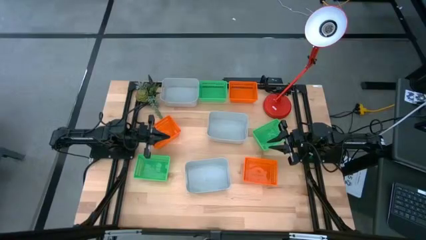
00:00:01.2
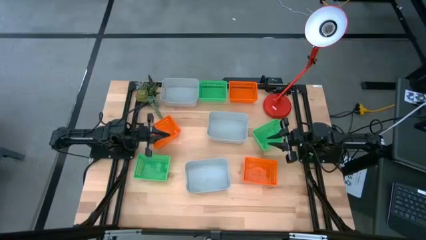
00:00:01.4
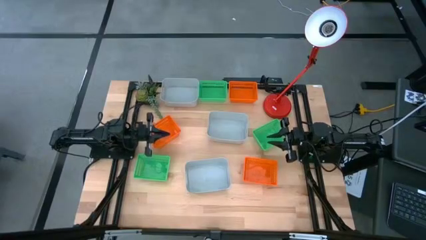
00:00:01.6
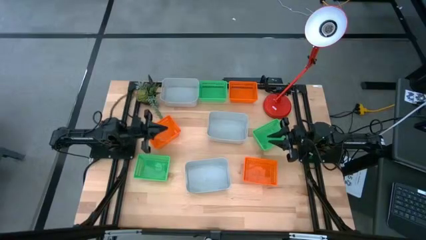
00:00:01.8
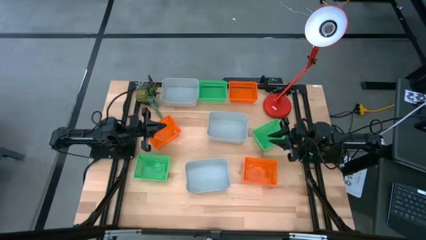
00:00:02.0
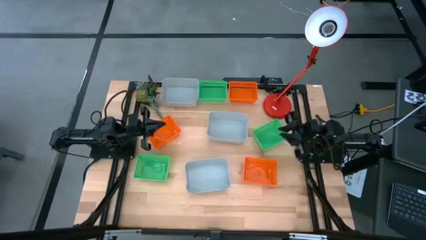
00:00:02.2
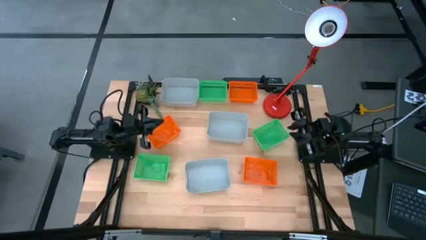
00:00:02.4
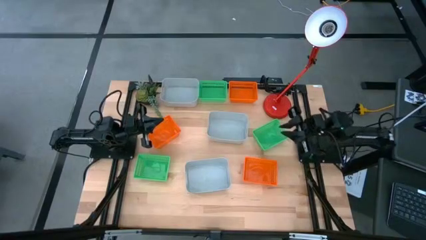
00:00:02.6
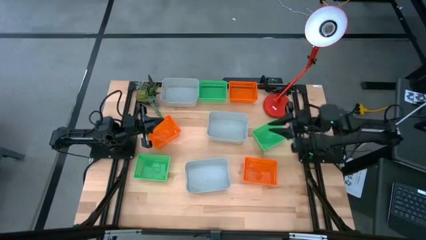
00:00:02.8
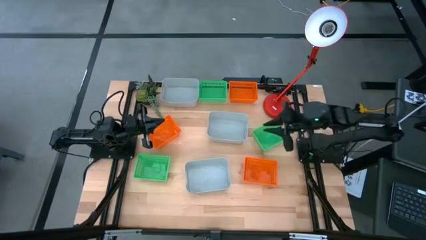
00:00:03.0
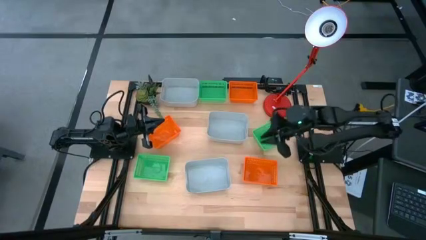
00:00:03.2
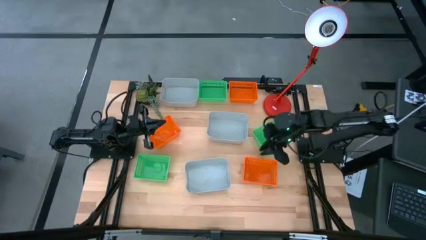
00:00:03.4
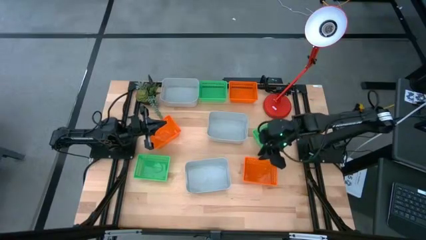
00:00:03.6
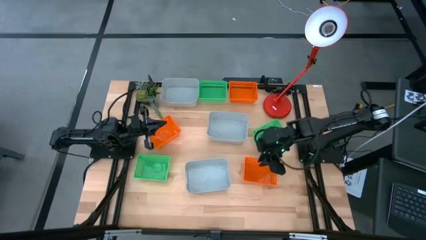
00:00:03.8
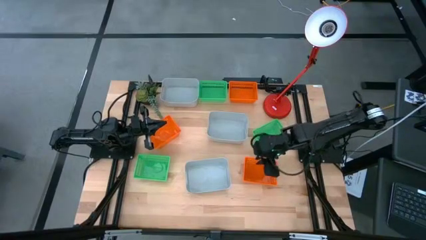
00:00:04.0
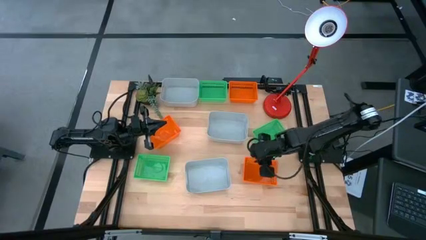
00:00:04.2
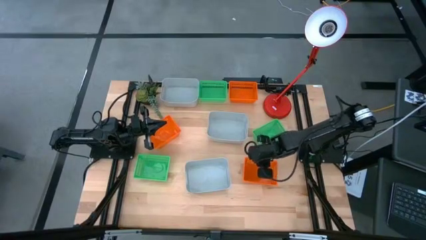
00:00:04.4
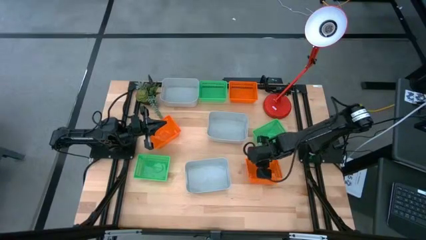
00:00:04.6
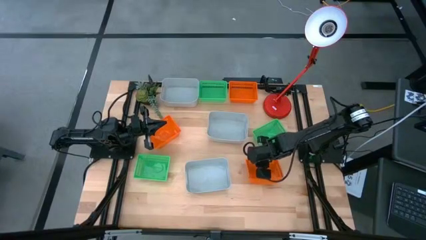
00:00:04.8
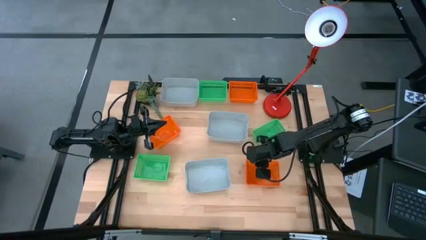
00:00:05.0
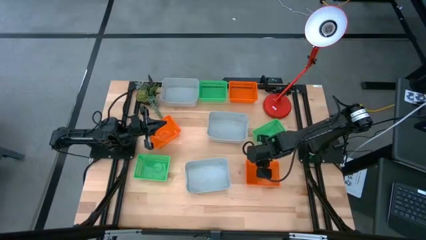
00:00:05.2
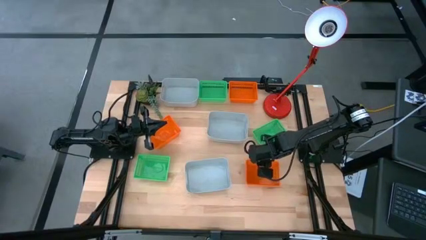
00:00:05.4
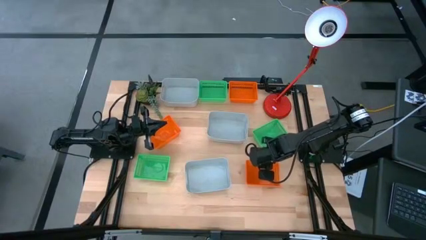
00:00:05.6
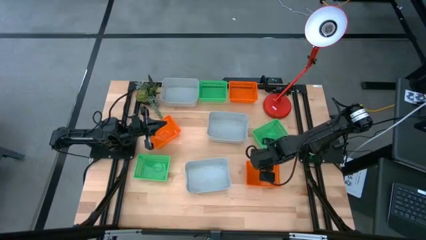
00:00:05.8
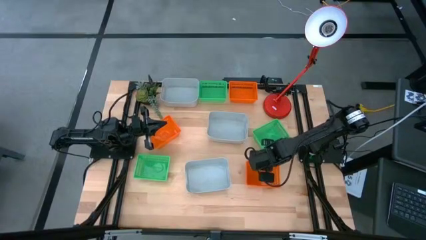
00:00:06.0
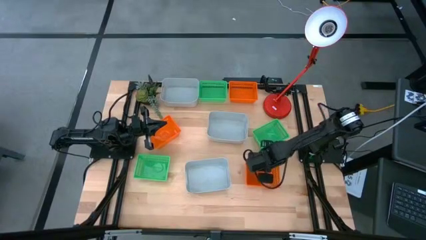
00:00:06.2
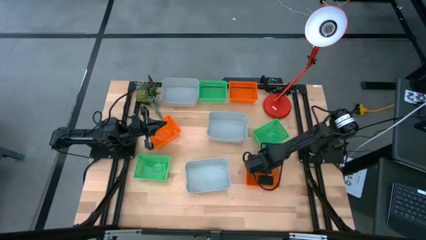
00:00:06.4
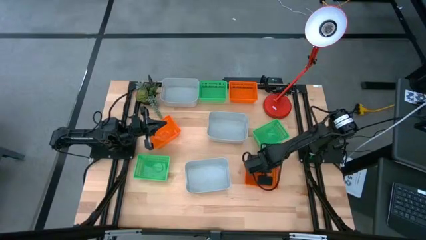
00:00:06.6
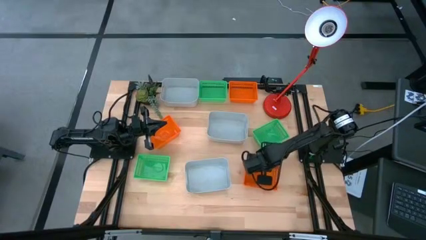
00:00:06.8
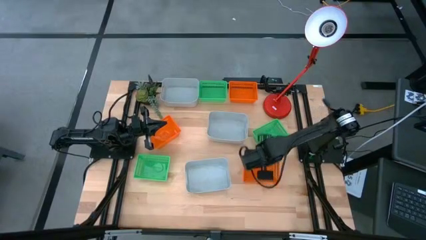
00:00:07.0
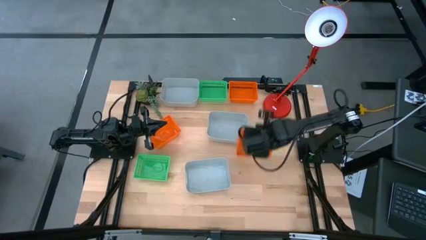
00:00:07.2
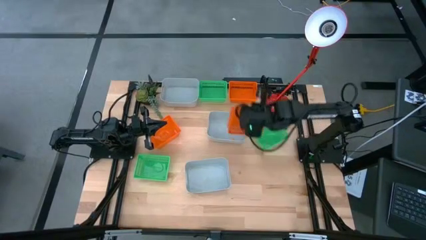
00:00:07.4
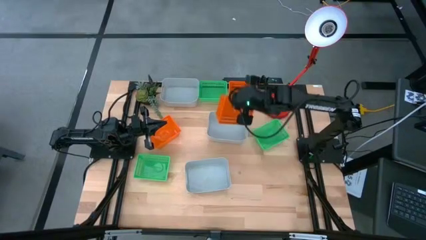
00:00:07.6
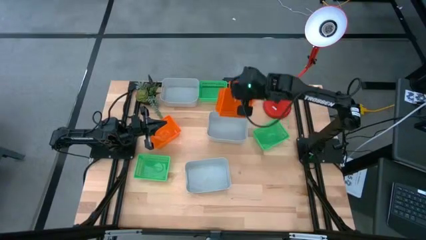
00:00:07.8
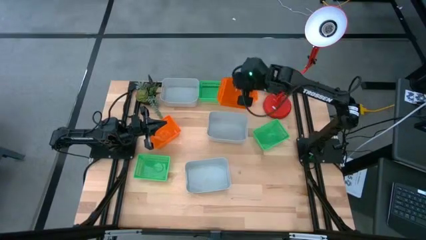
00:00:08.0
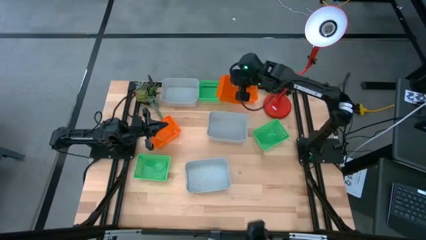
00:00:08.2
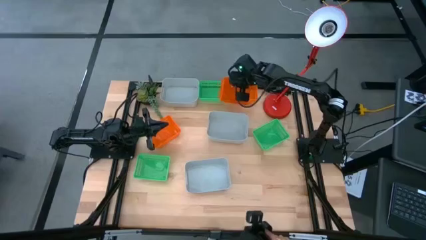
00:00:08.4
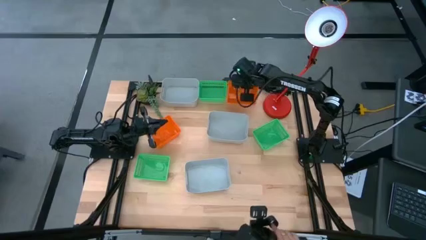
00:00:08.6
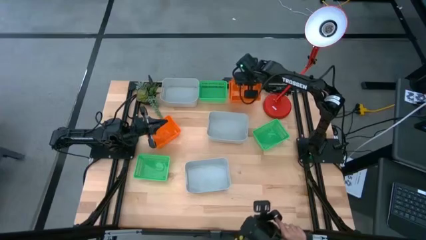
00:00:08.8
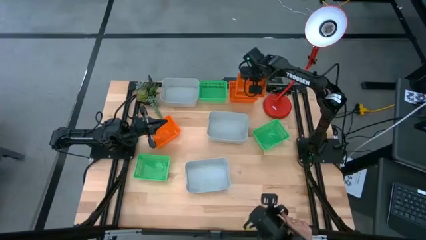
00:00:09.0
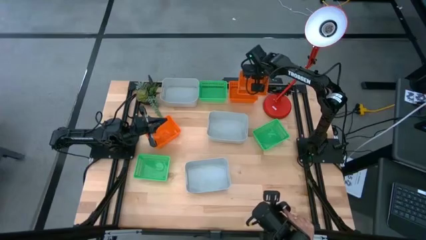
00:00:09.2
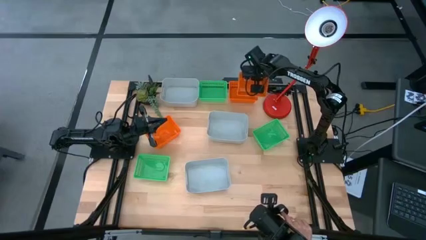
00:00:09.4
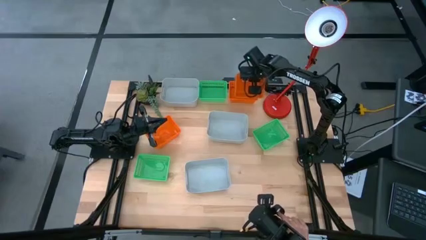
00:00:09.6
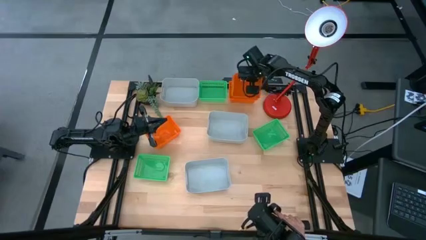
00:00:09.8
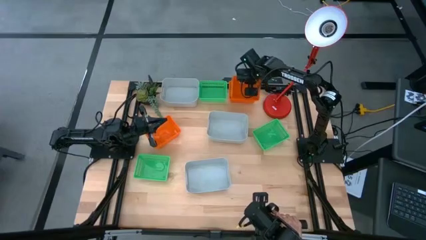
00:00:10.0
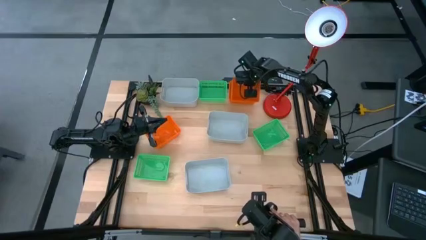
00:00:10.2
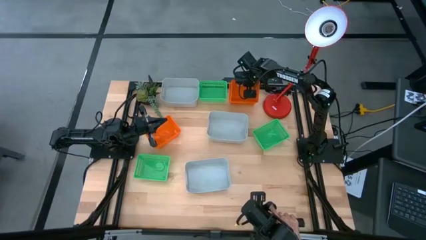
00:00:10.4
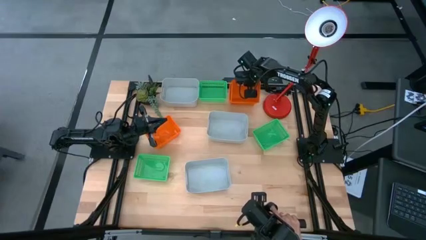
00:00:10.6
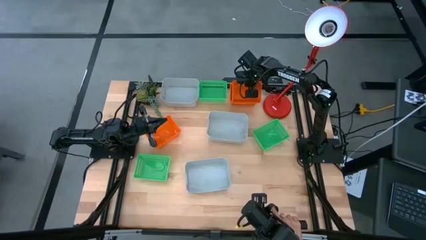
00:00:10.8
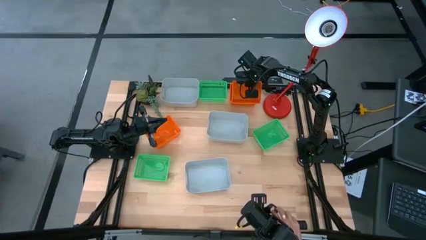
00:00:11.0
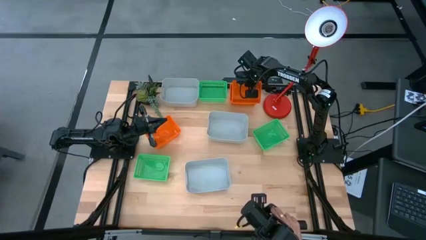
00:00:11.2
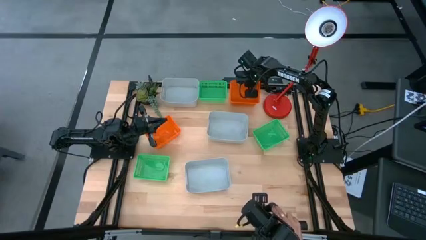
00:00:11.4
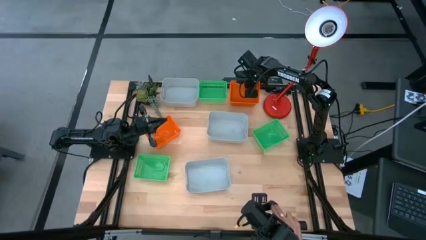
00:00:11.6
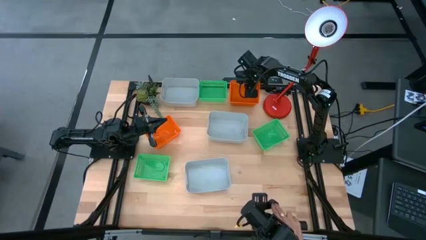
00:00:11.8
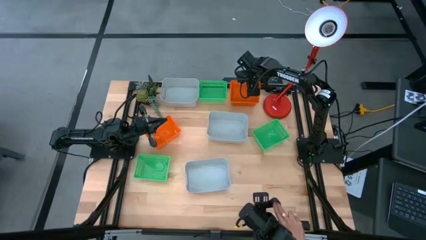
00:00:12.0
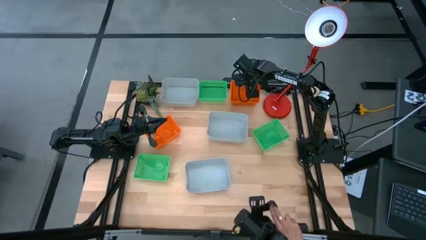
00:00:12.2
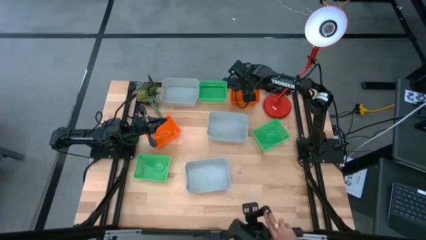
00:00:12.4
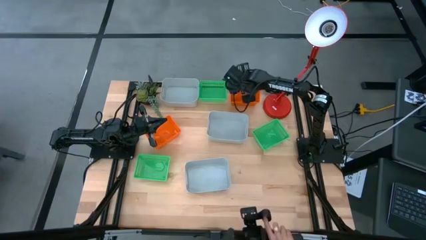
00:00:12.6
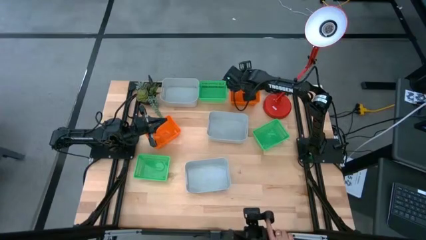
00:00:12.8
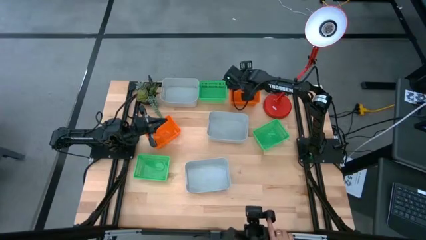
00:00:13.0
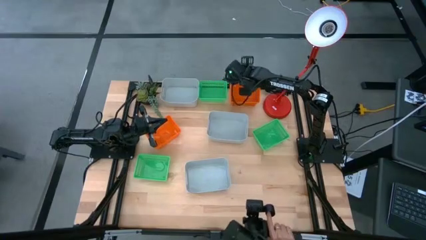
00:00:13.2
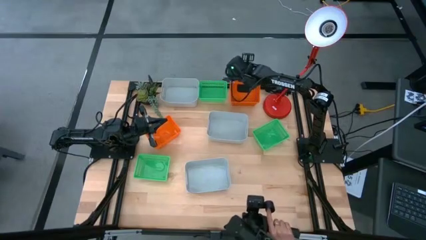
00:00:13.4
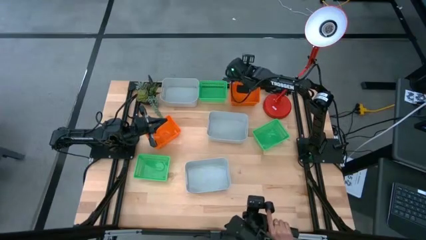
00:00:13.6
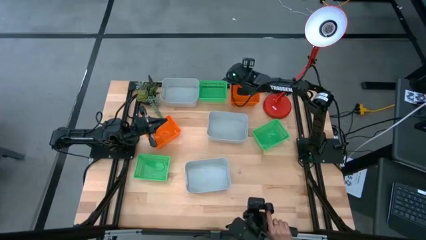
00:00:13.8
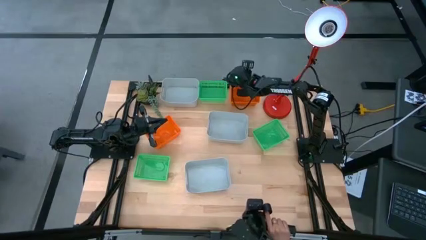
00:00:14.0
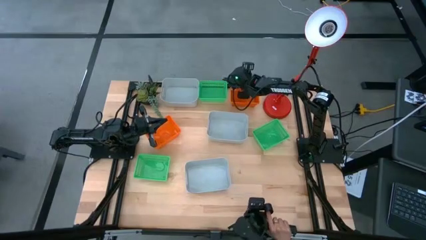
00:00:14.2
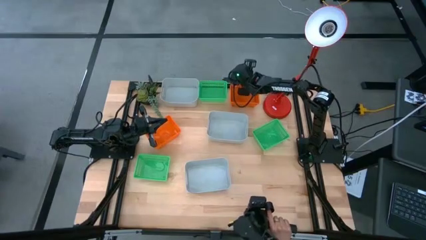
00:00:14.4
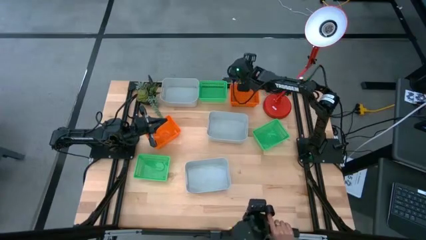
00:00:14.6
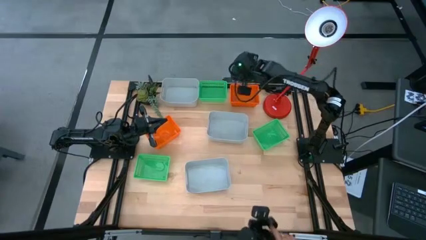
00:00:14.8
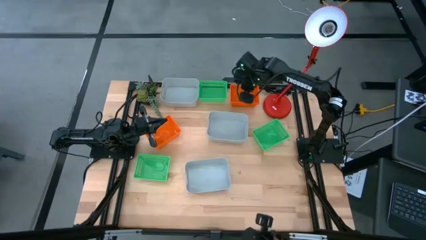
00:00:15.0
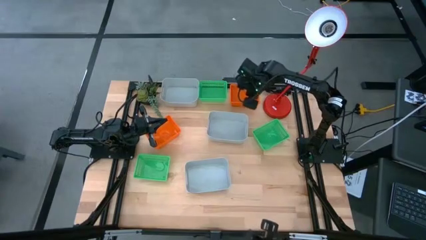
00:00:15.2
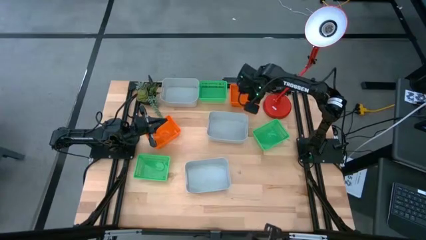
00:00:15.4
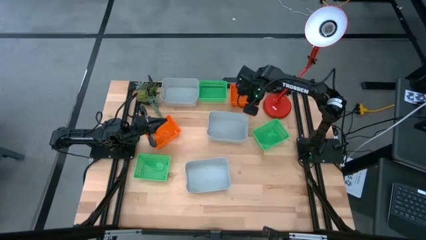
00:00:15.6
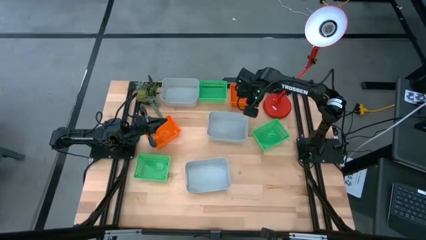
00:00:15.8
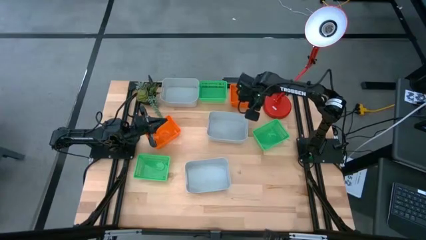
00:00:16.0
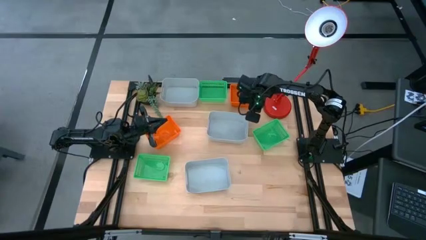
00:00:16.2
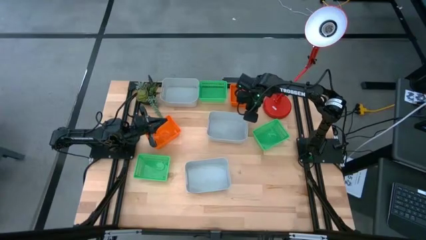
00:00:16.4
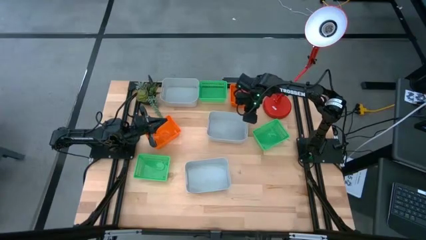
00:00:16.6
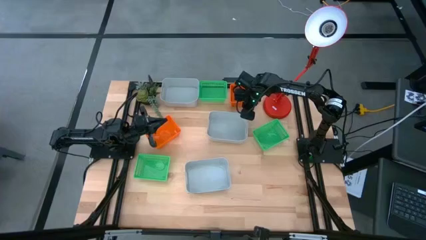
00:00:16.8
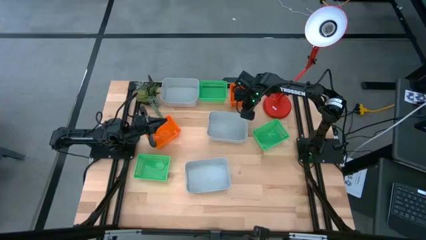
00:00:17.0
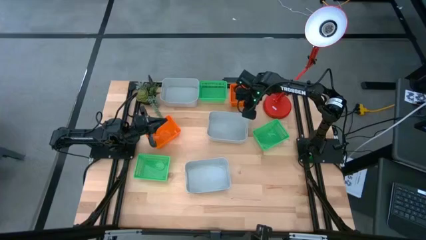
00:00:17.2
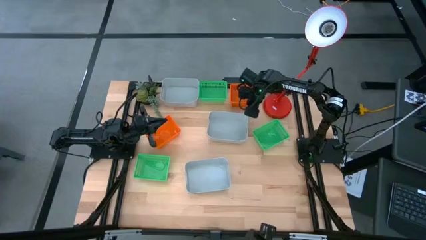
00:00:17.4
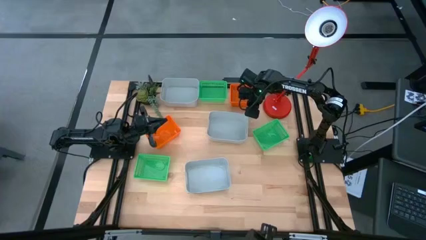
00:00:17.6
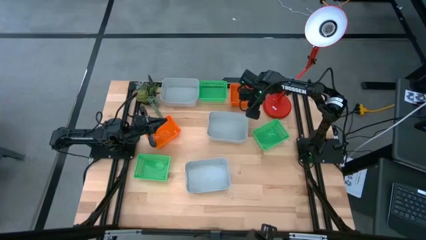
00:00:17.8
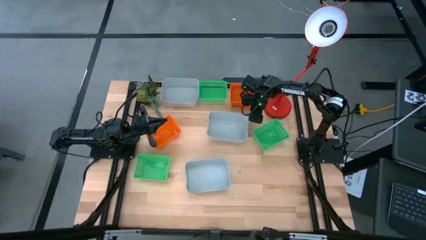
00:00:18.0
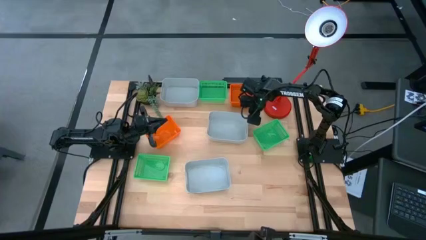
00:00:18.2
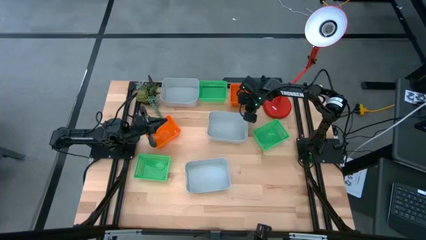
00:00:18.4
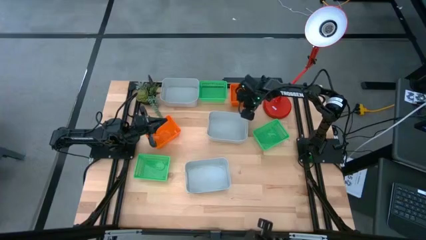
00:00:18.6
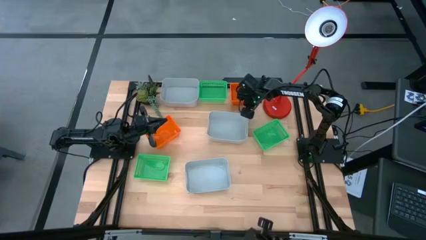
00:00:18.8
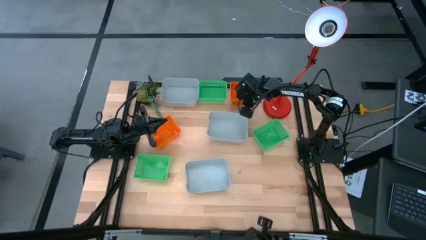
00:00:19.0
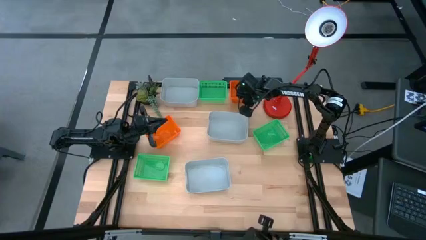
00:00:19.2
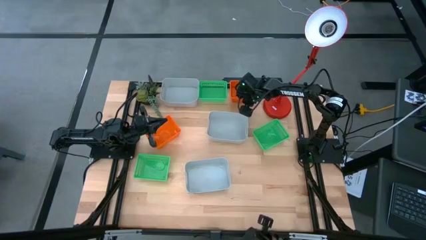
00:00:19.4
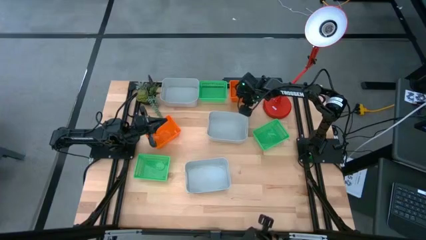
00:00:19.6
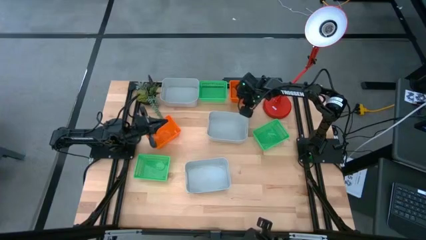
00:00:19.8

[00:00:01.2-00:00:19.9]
Stack the bottom right orange bin on top of the top orange bin
